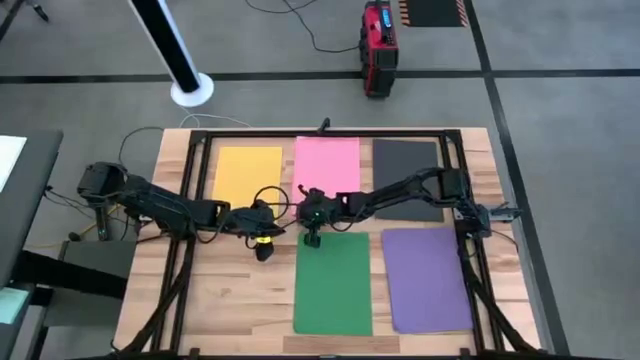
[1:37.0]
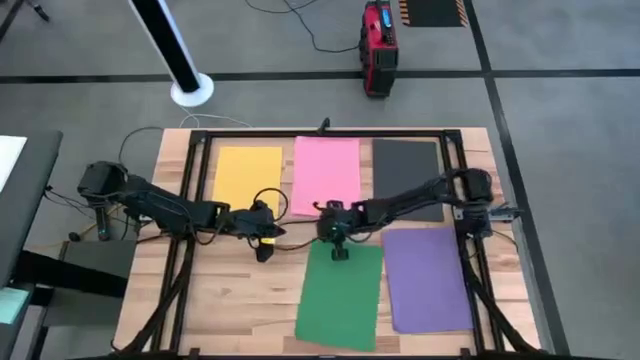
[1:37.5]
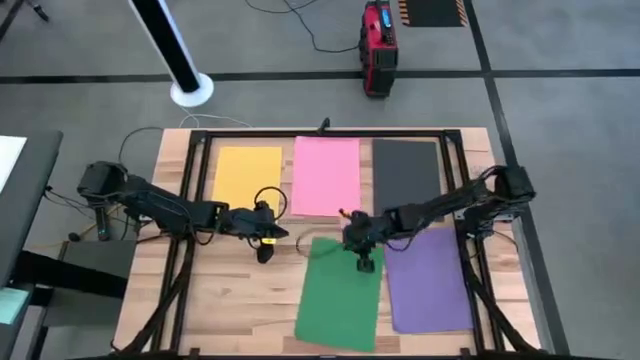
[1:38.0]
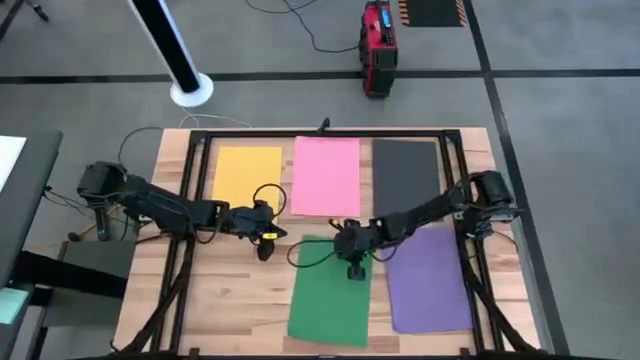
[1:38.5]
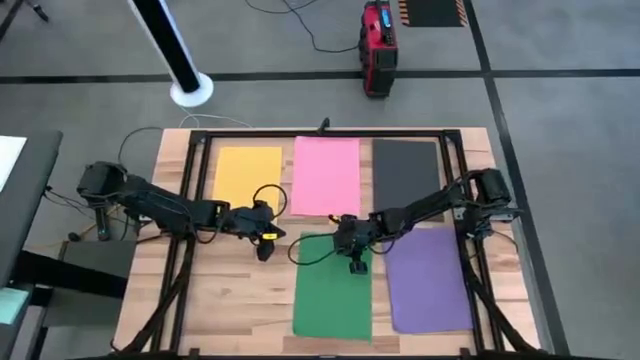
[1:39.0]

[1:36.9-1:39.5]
Task: Organize paper
Adjust the green colored paper

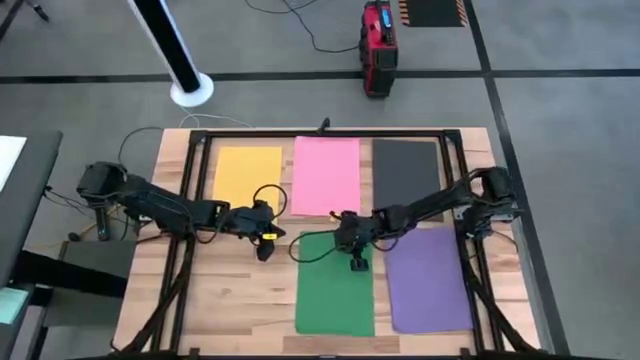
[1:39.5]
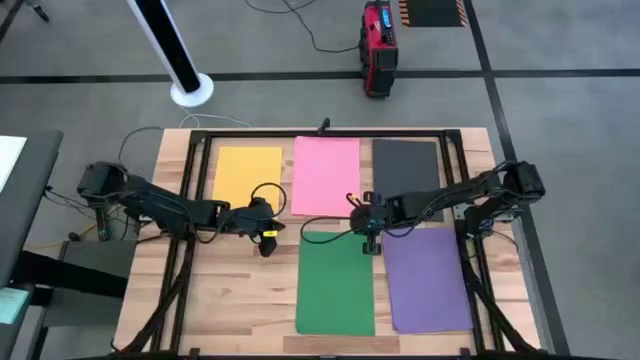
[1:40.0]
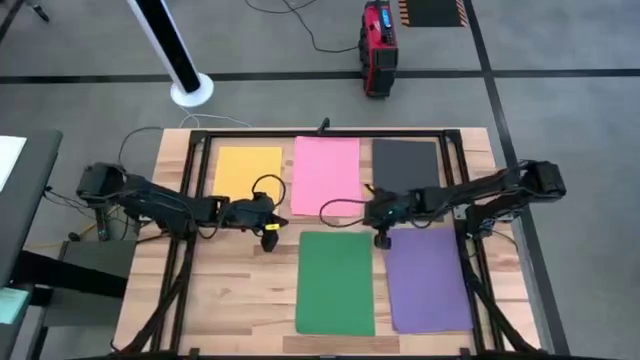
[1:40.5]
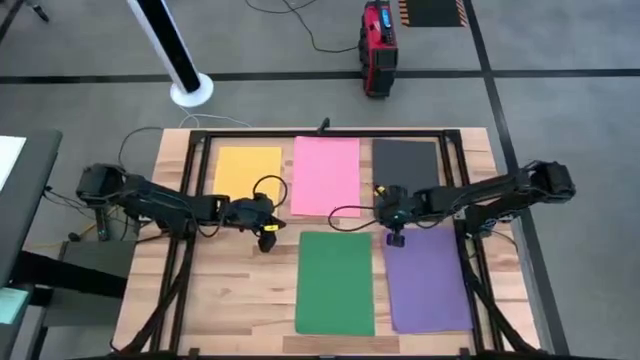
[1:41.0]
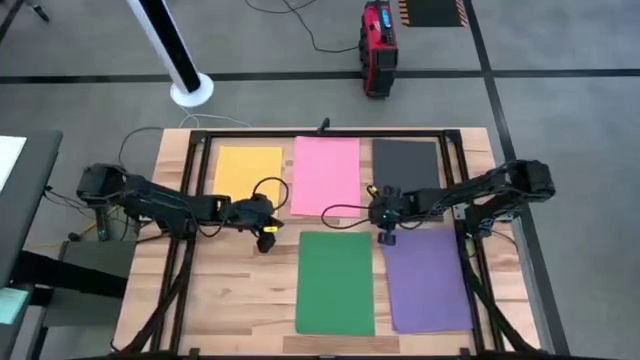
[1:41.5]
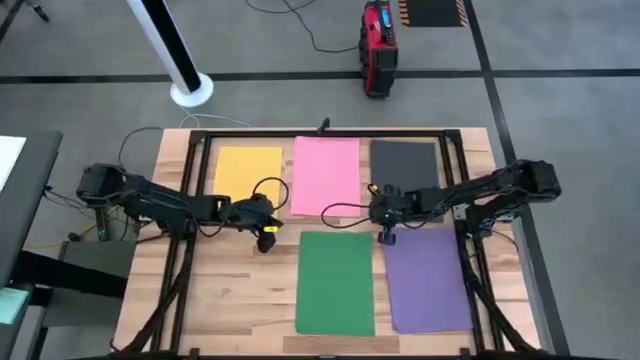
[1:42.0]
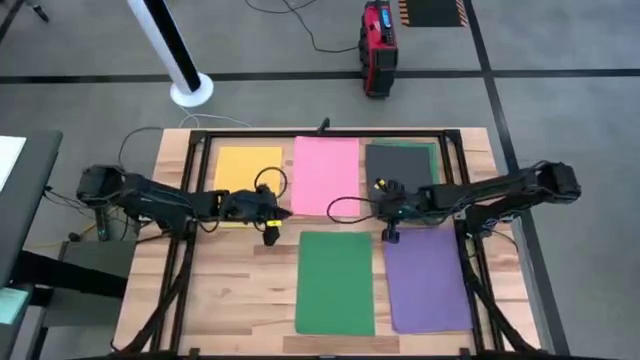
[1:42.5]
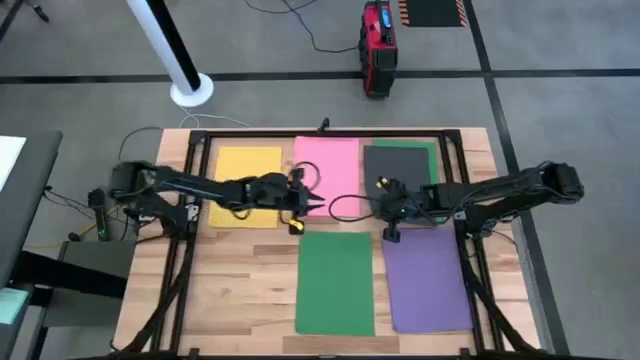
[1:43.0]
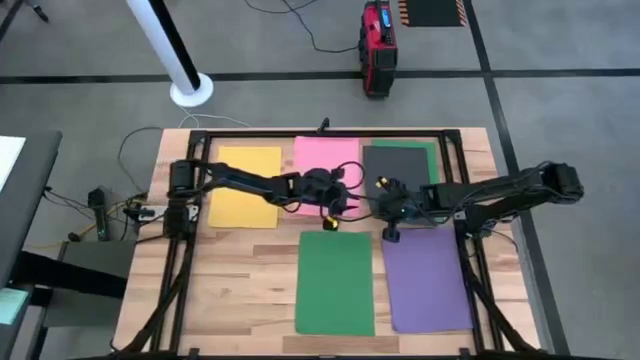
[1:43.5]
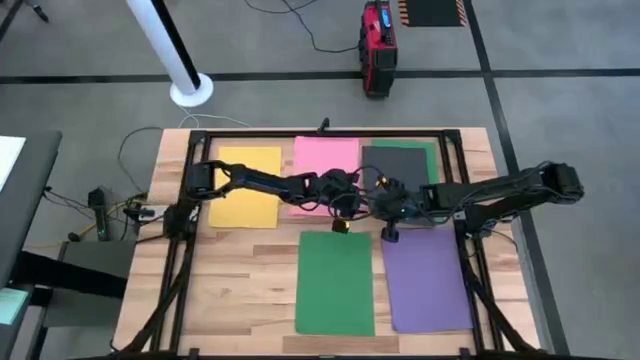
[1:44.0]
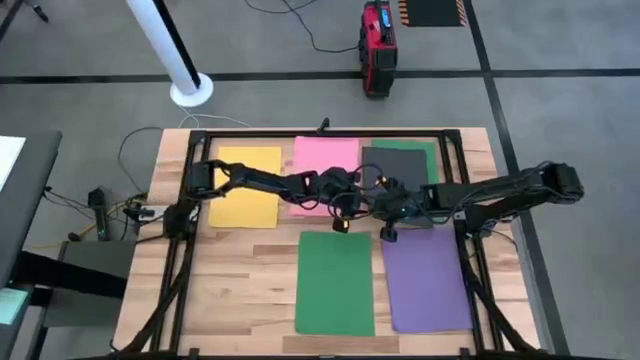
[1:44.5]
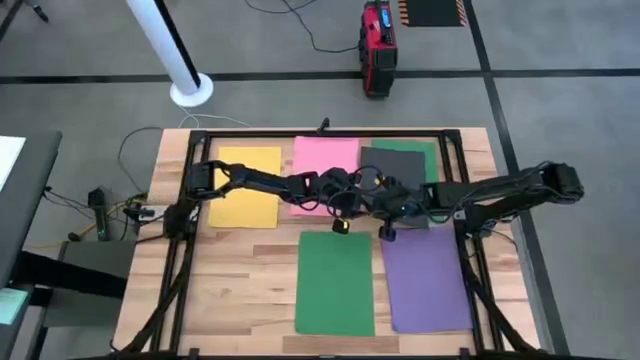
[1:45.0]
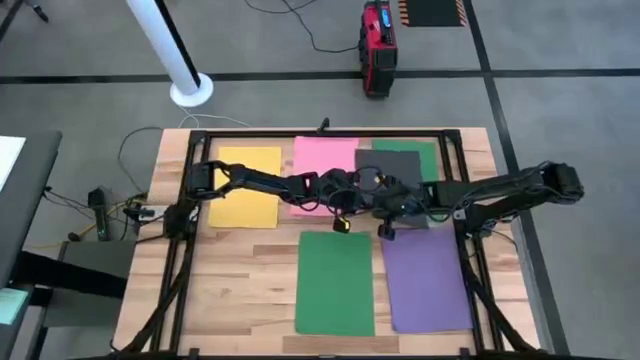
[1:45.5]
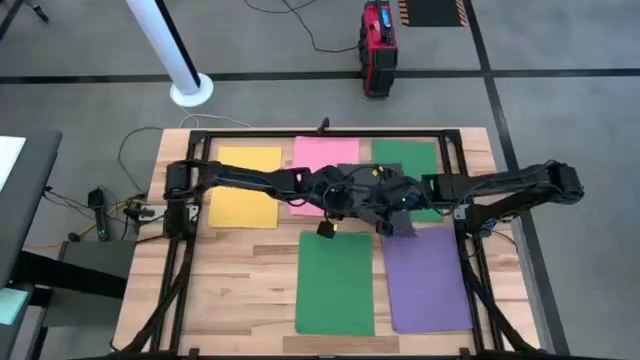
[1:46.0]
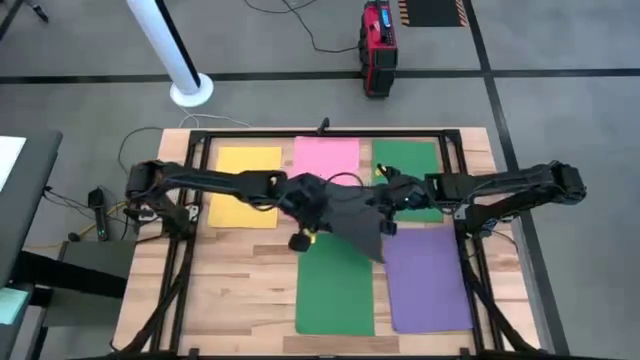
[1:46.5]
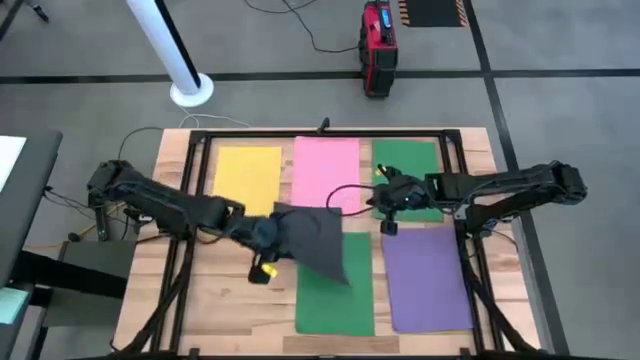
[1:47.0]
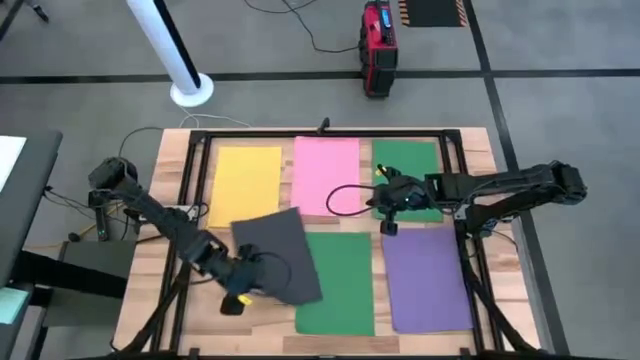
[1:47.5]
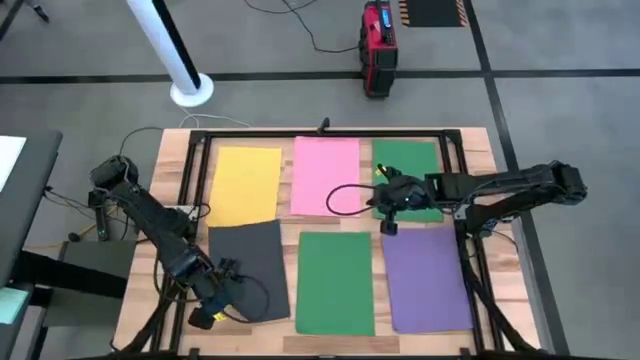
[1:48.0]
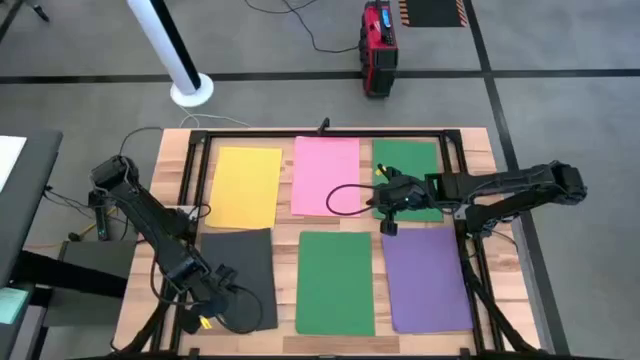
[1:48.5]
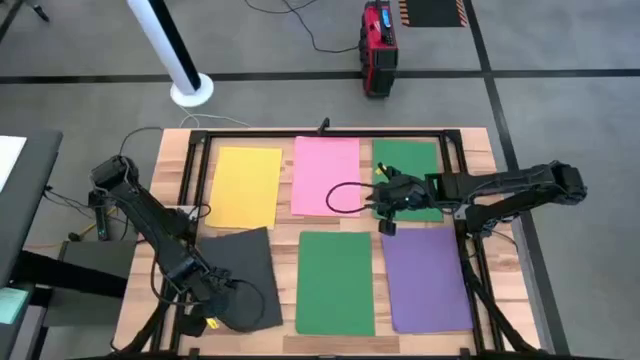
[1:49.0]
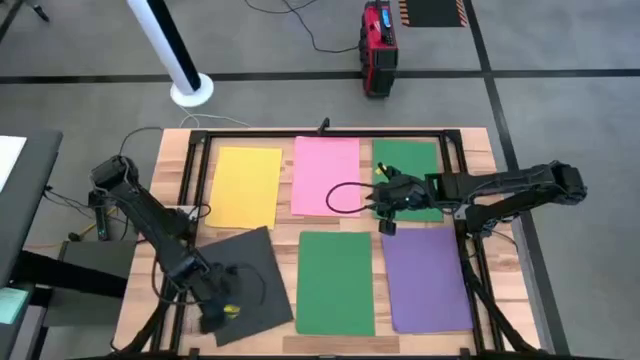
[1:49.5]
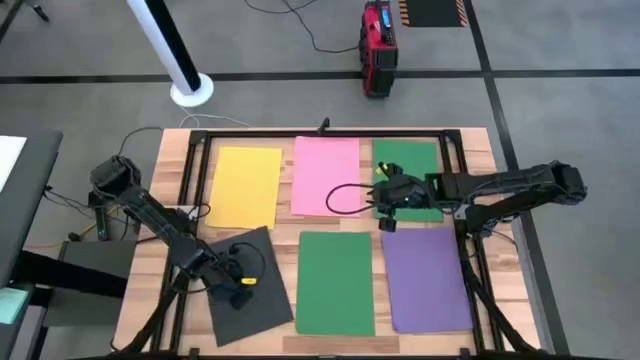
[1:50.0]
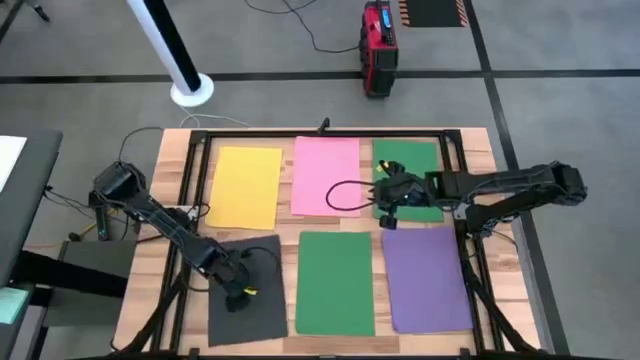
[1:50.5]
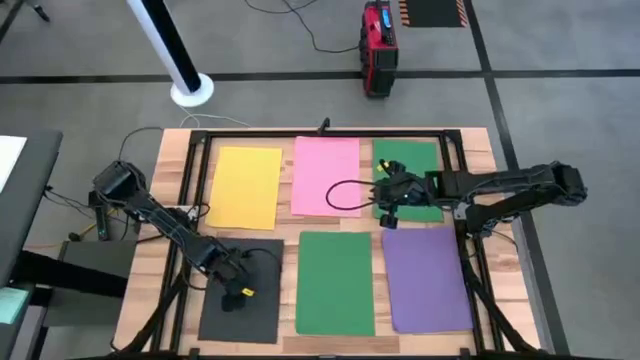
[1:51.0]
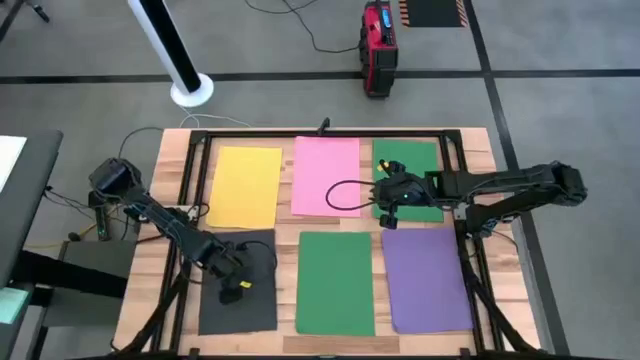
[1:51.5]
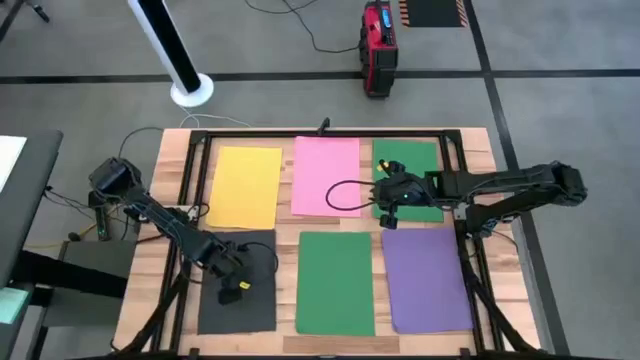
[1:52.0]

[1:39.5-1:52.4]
Move the black colored paper to the bottom left of the table

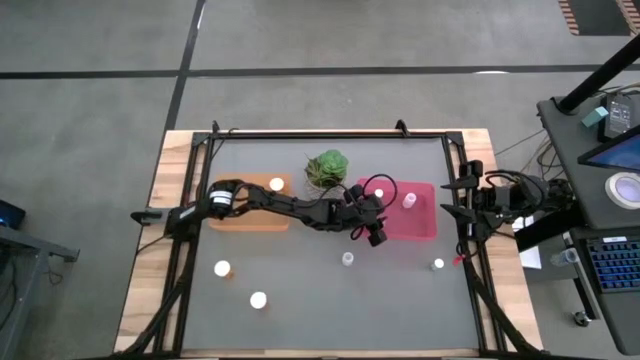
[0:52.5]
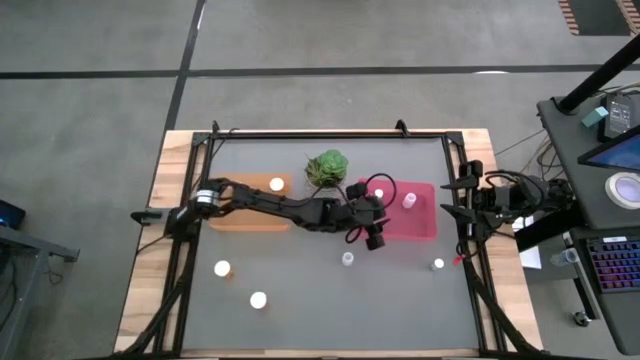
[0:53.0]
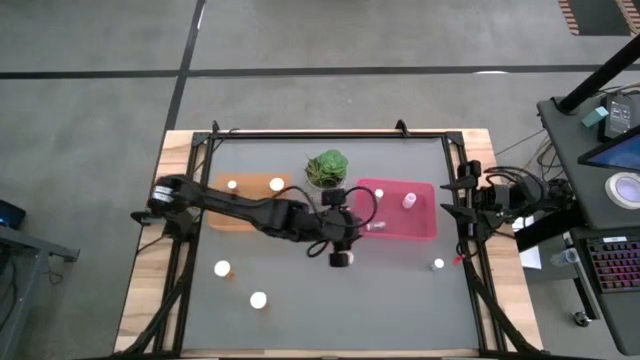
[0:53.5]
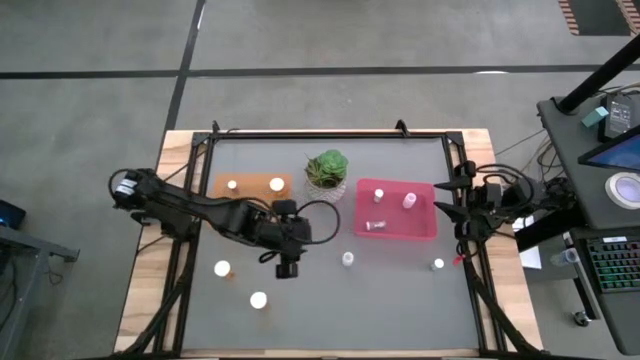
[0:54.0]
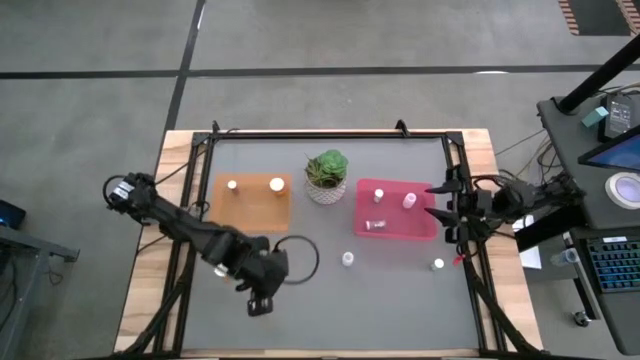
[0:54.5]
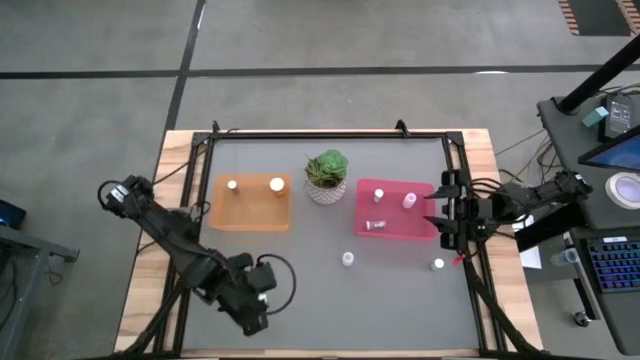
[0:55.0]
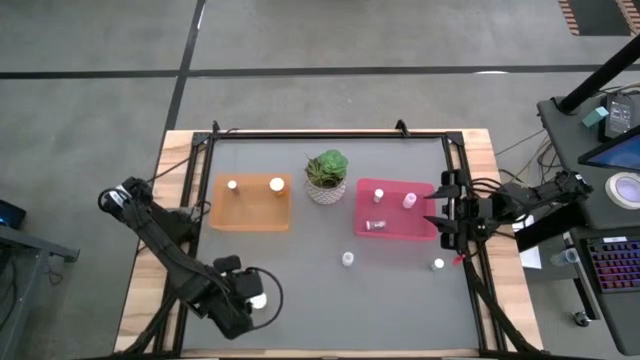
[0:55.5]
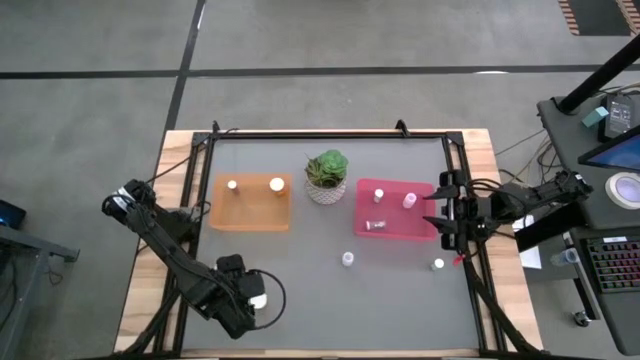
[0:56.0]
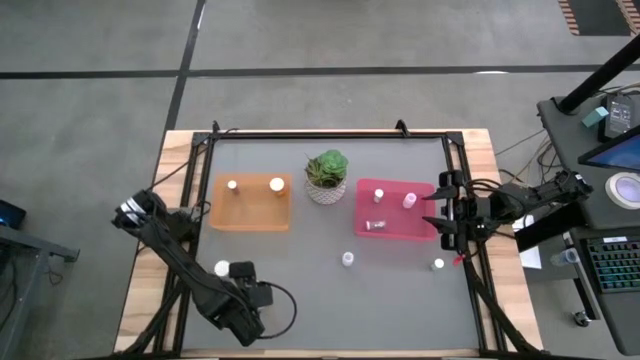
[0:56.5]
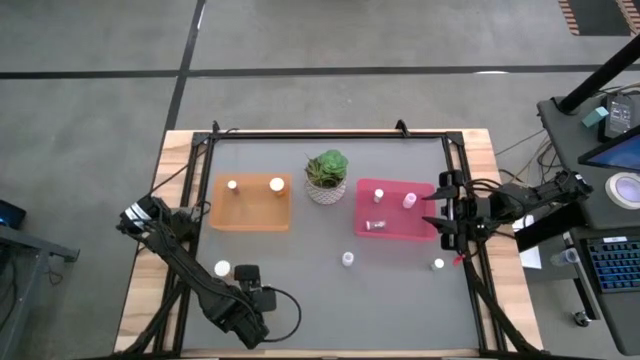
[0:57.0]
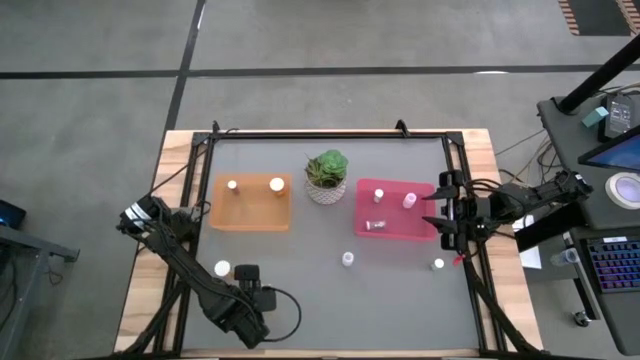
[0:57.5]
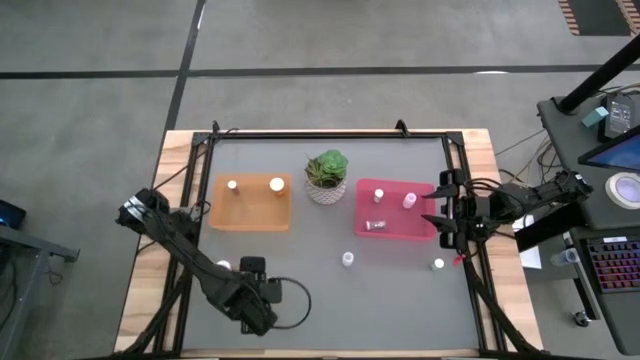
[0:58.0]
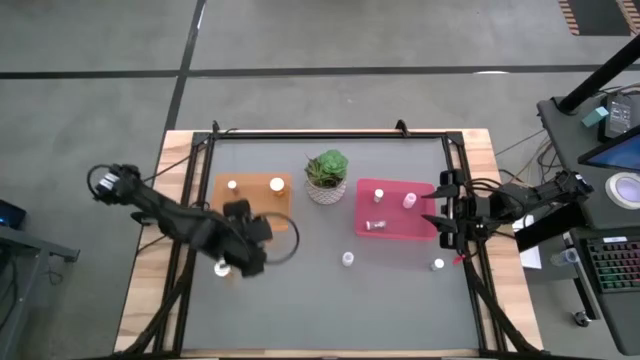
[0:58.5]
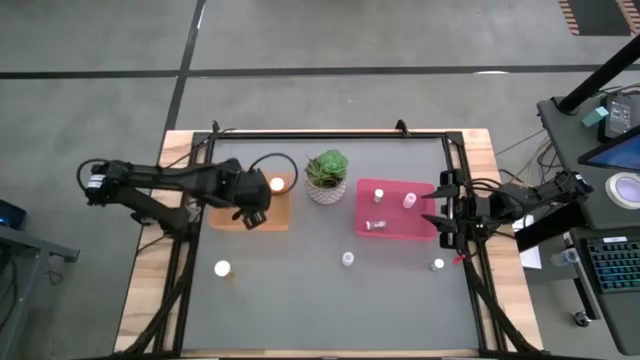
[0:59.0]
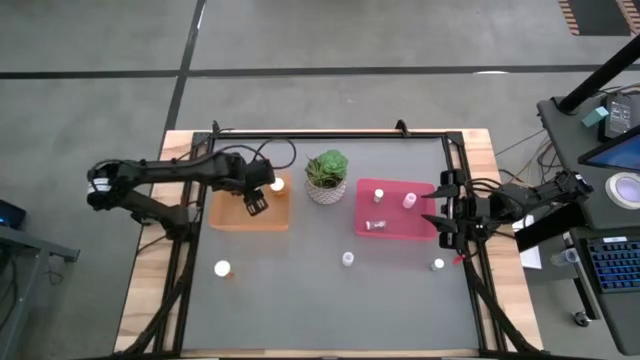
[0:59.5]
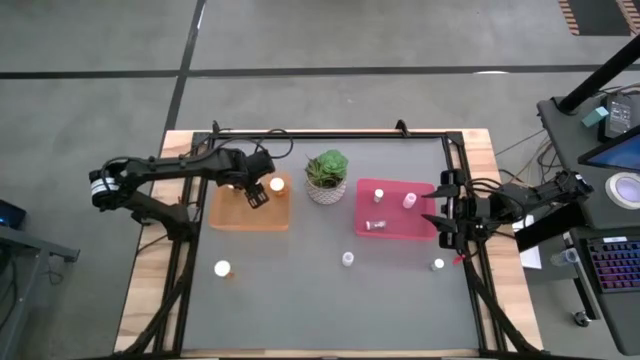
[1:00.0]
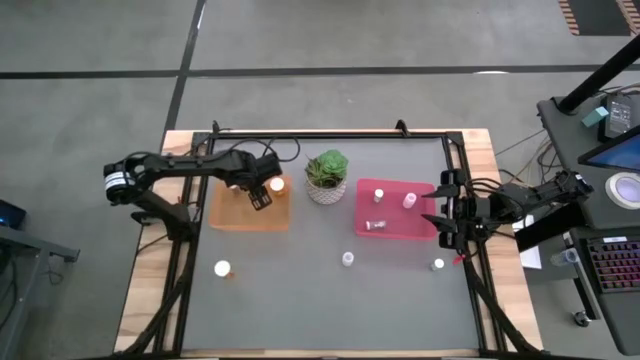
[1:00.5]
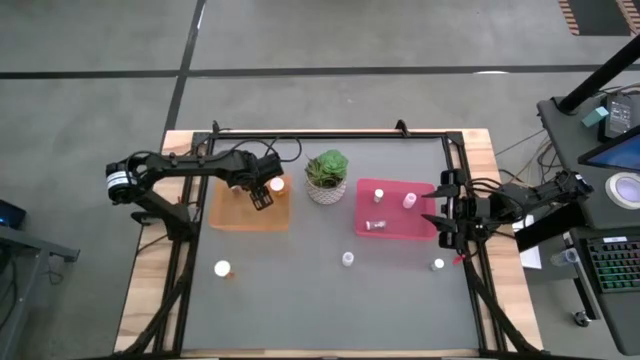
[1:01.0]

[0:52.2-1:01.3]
Task: Pick and place medicine bottles into bin by pill shape (circle, oval)
Put the bottom large orange pill bottle in the orange bin
